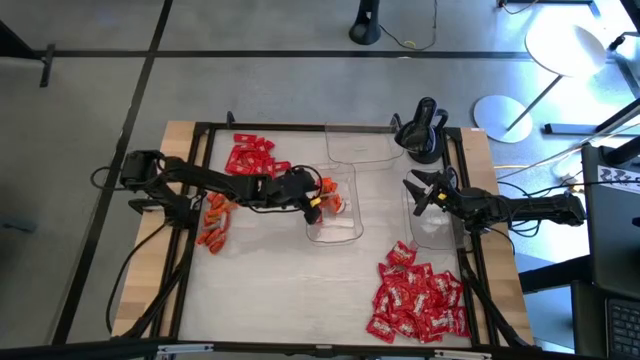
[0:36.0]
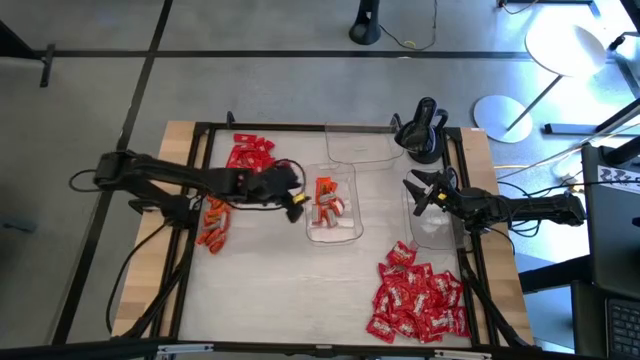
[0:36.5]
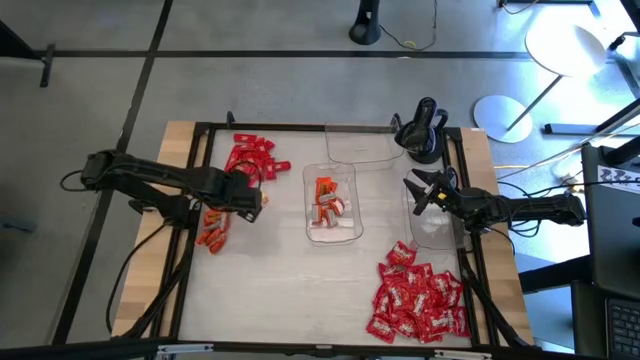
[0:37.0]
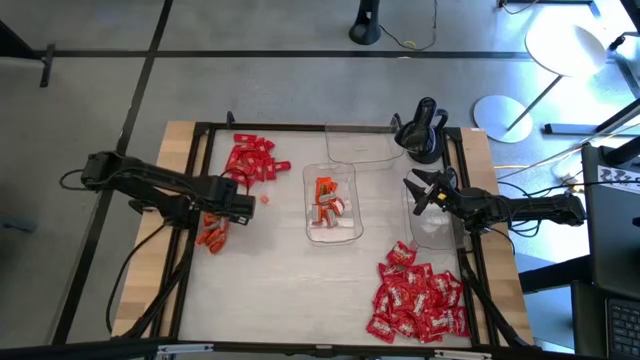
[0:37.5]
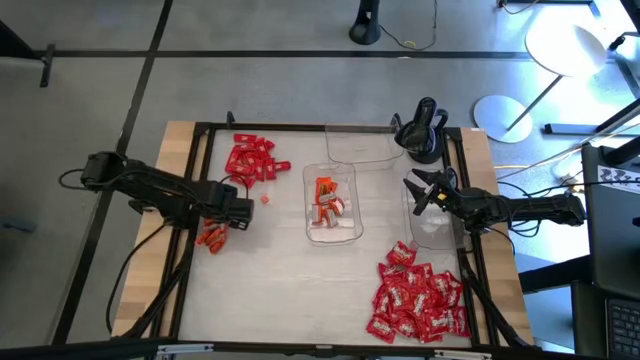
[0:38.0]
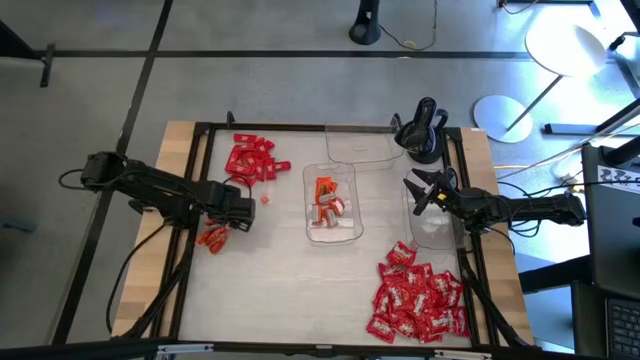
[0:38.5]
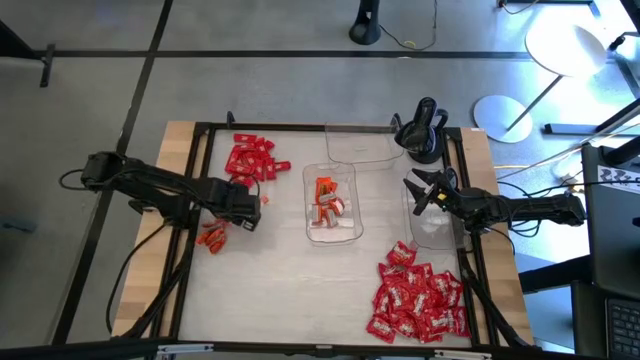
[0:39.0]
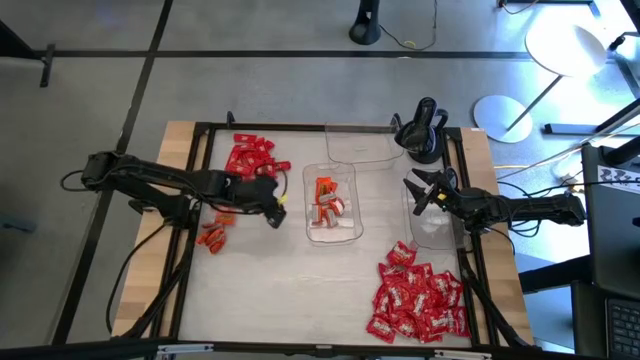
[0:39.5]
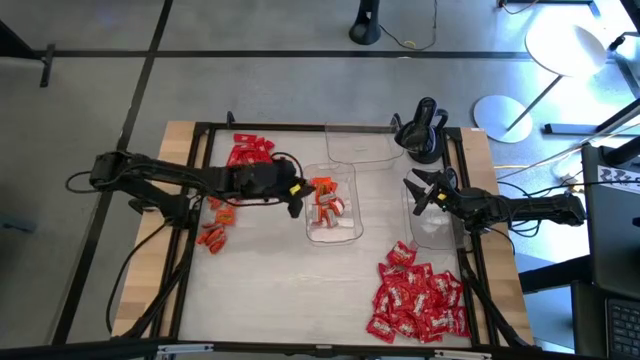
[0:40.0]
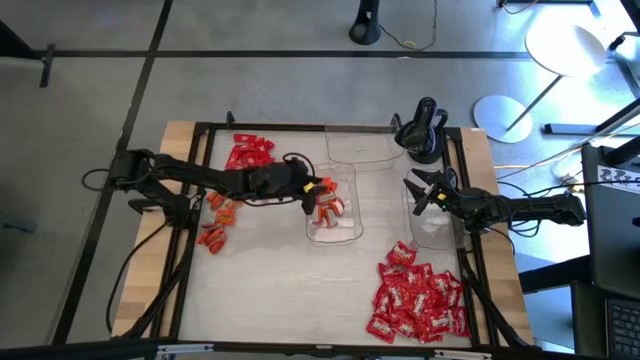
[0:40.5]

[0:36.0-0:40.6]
Task: Sort candy
Put the orange chocolate into the bottom left transparent bin

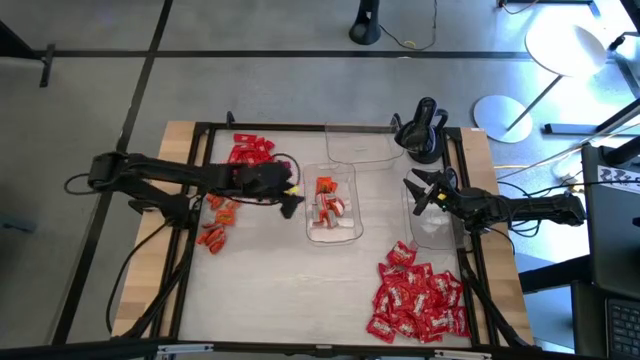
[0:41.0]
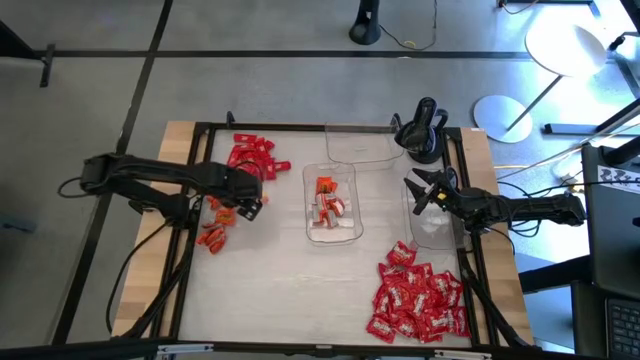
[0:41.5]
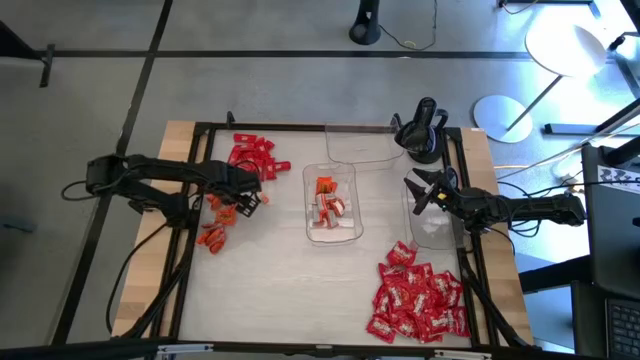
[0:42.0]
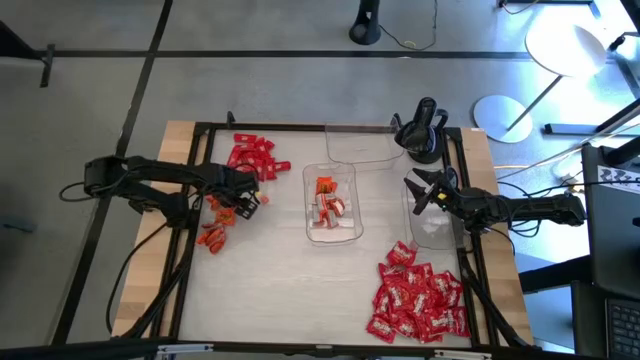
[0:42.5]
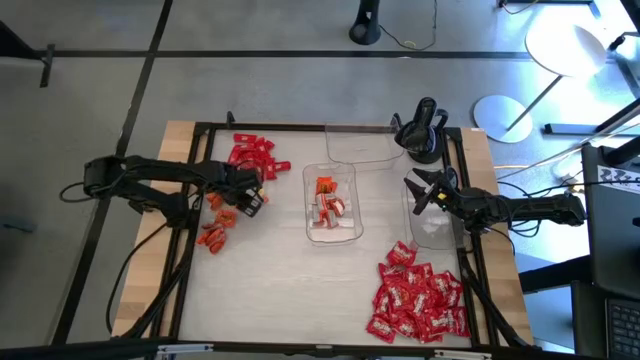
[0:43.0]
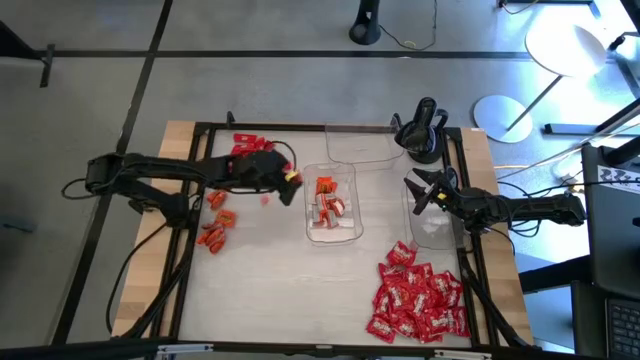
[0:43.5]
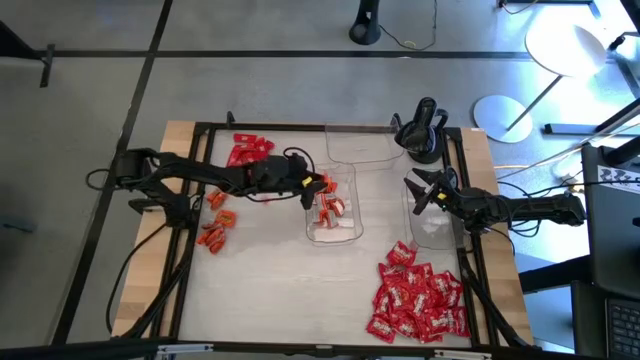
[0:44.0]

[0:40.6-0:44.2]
Put the orange chocolate into the bottom left transparent bin

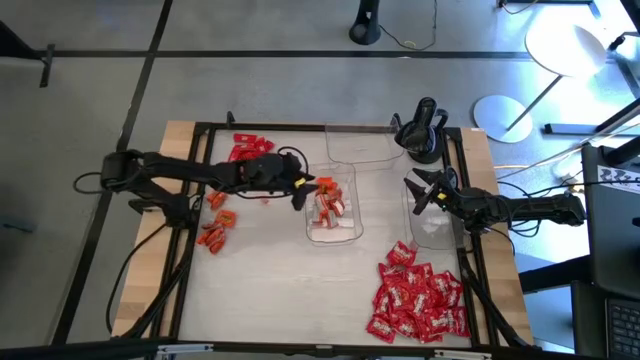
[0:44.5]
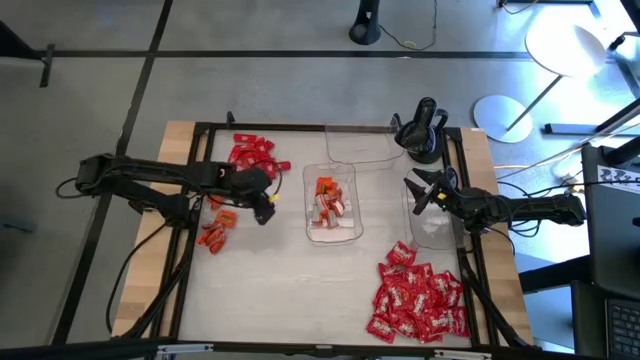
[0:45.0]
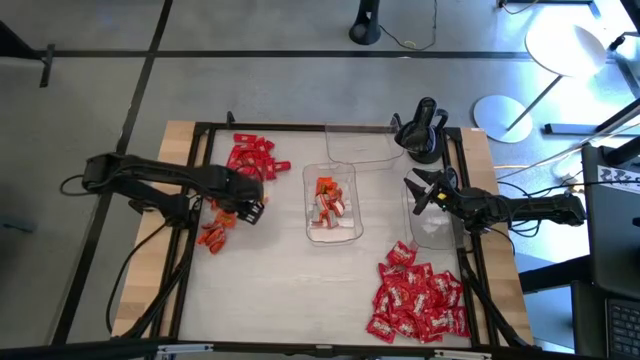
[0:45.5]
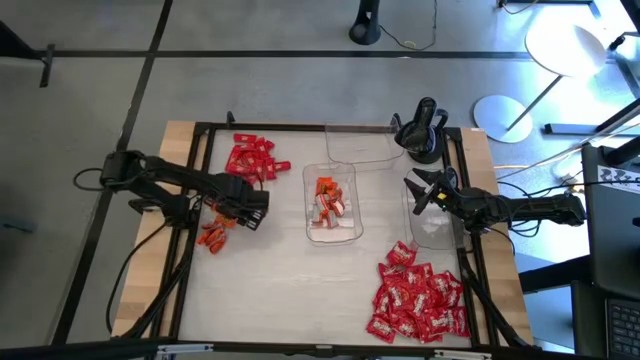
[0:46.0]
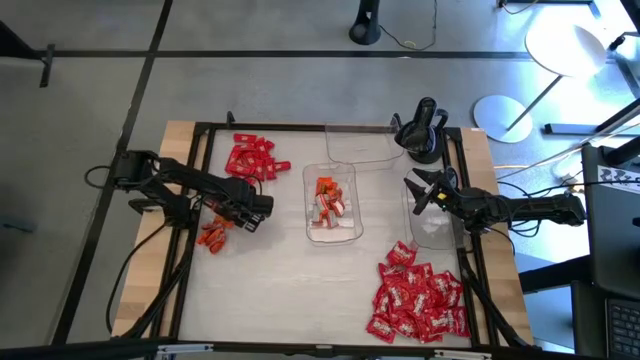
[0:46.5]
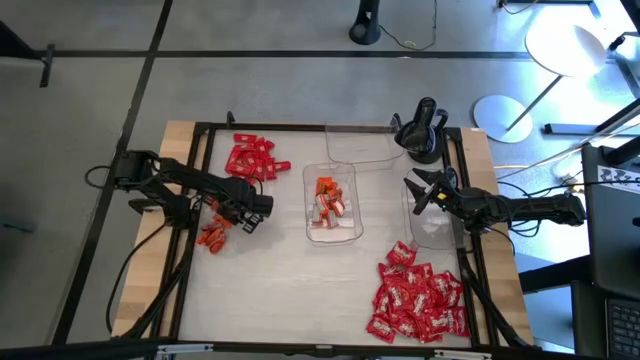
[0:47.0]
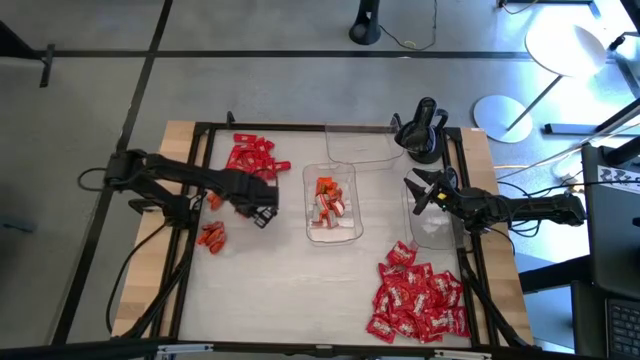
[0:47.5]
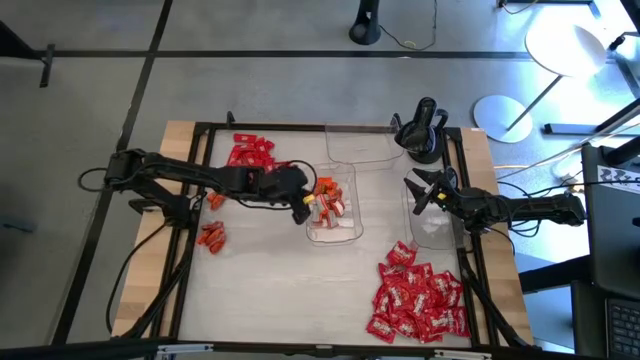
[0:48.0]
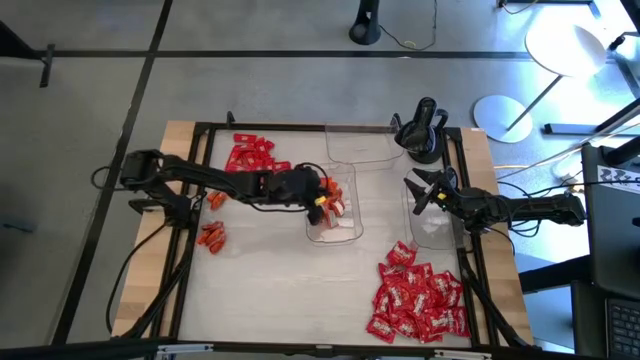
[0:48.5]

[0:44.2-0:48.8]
Put the orange chocolate into the bottom left transparent bin

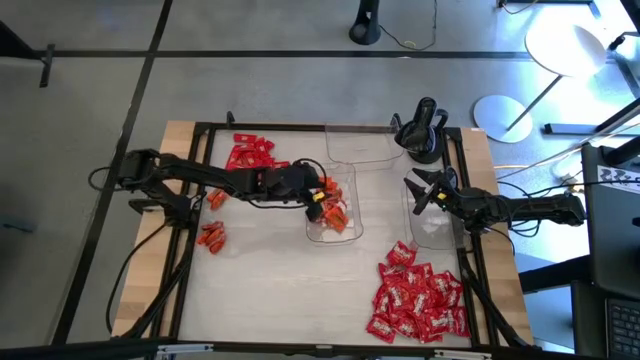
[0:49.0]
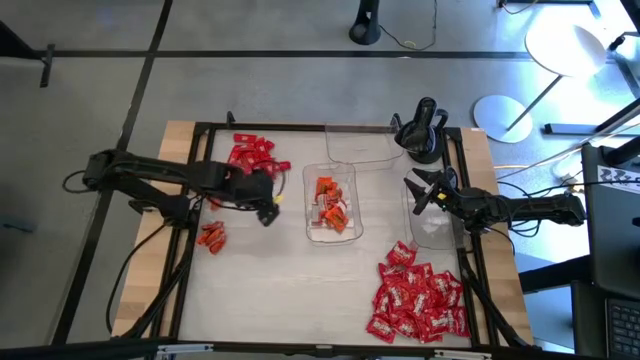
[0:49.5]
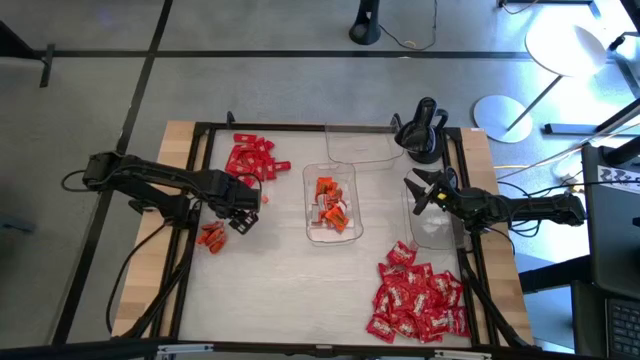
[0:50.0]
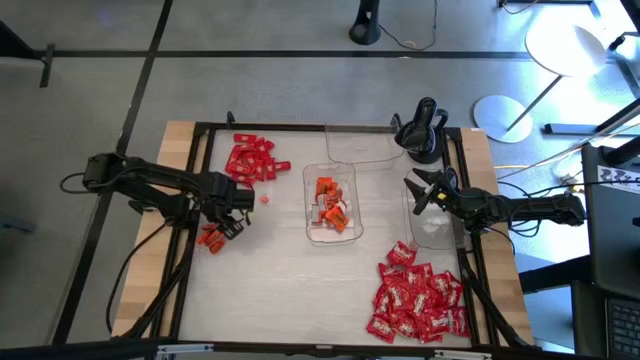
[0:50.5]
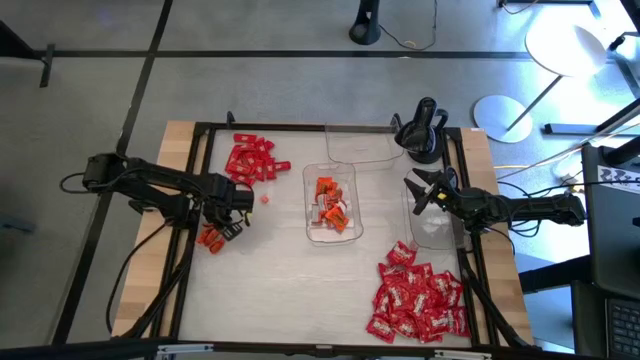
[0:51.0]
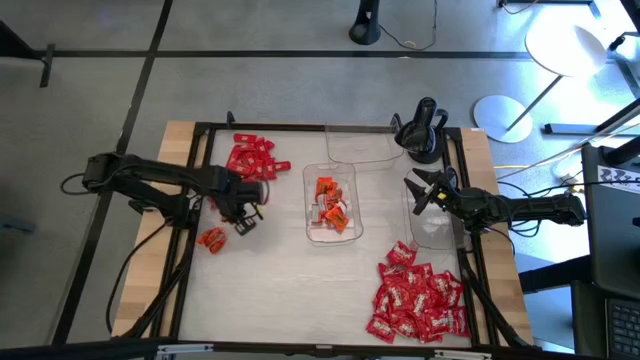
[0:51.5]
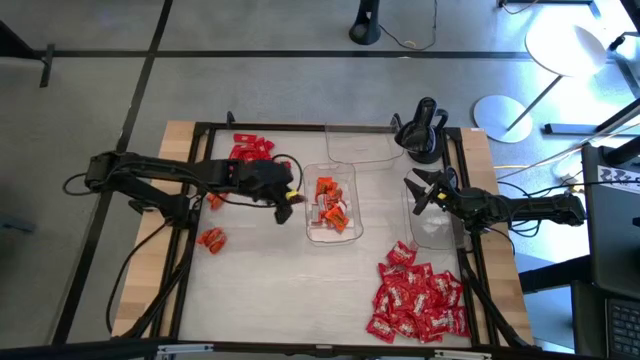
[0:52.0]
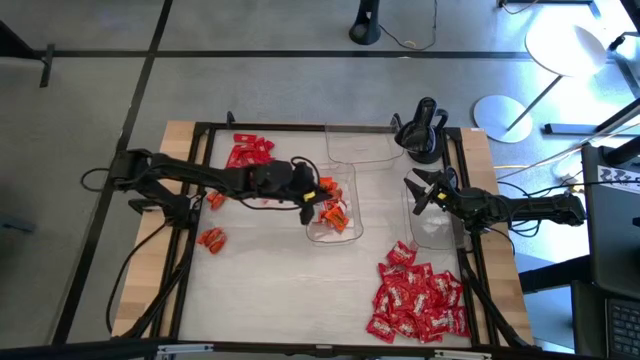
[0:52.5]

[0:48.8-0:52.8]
Put the orange chocolate into the bottom left transparent bin

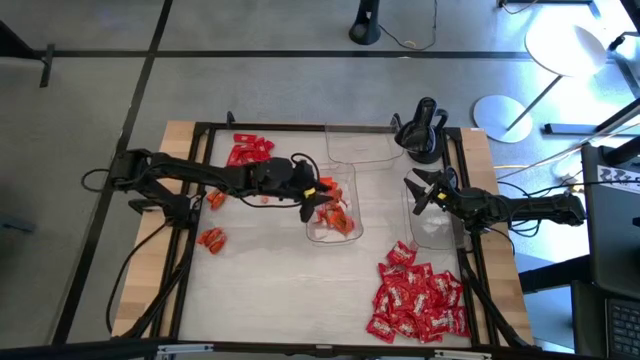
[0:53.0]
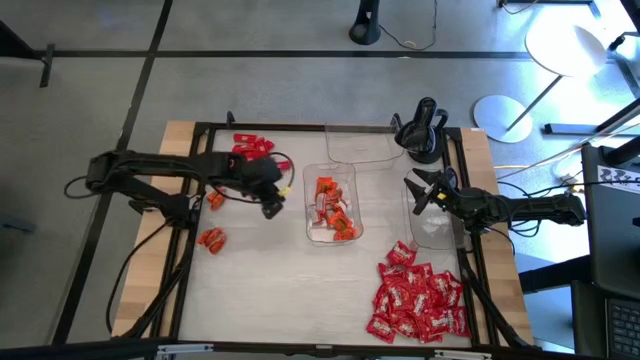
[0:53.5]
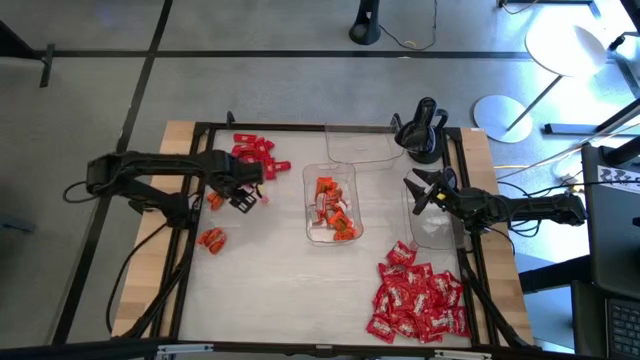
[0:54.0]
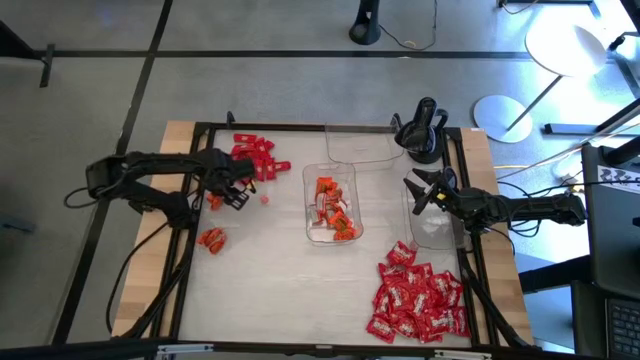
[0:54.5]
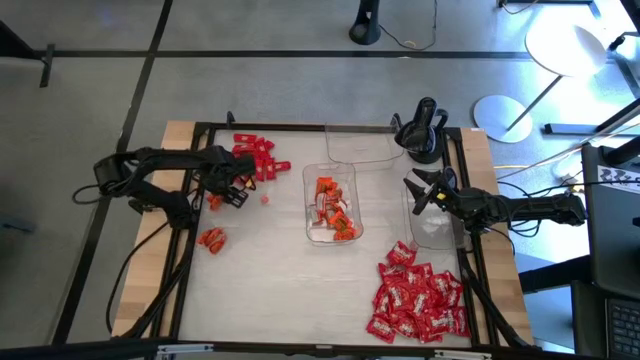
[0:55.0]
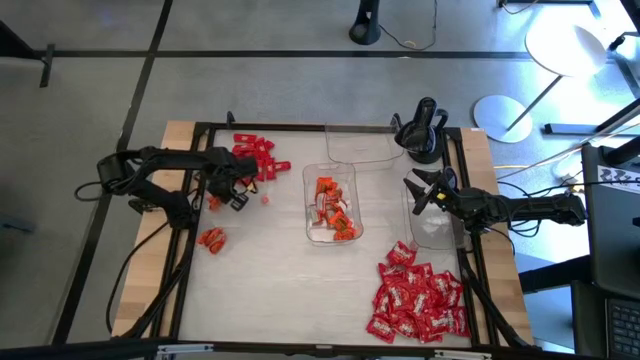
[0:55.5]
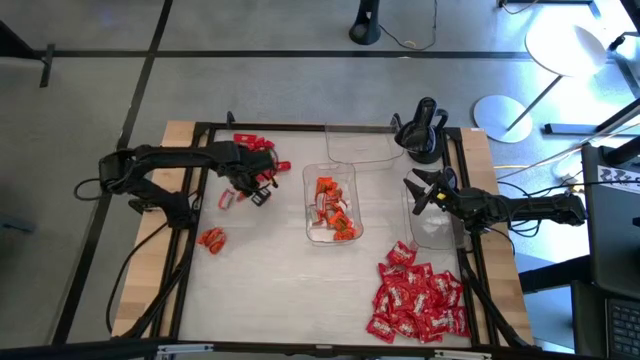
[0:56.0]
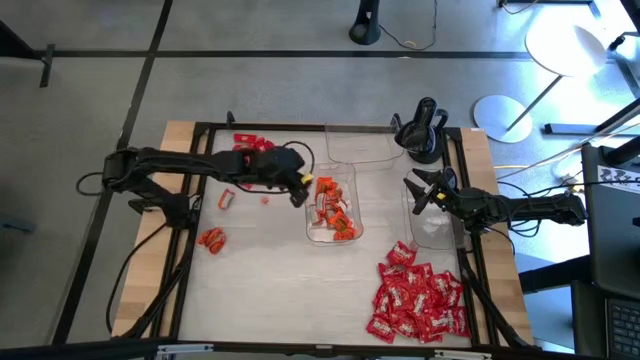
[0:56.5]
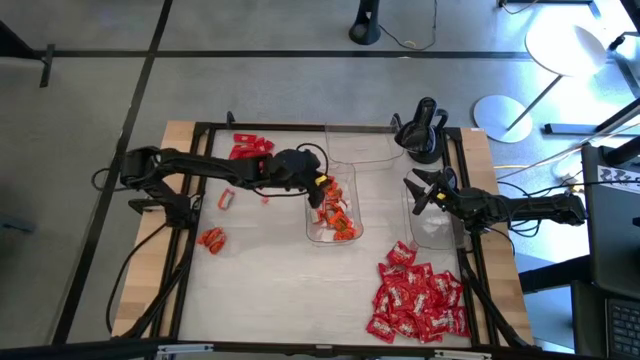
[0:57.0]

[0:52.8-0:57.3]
Put the orange chocolate into the bottom left transparent bin
